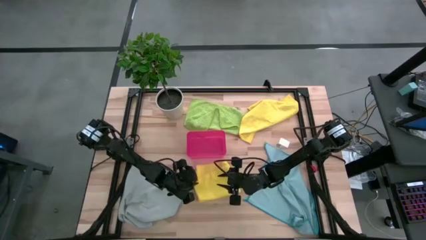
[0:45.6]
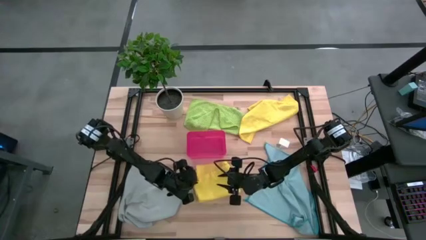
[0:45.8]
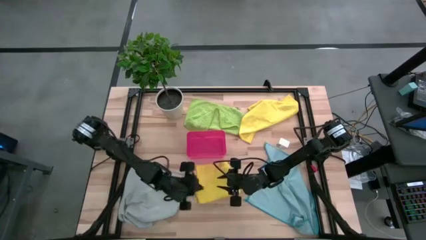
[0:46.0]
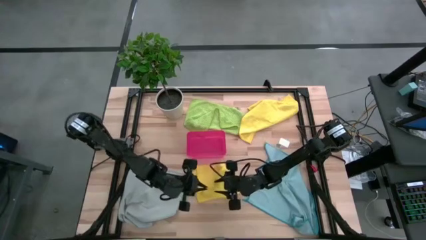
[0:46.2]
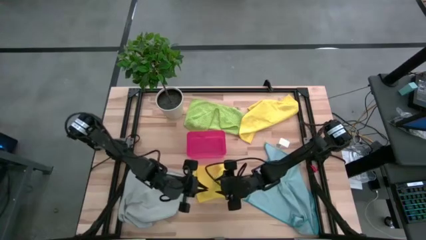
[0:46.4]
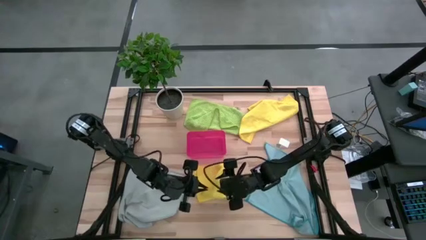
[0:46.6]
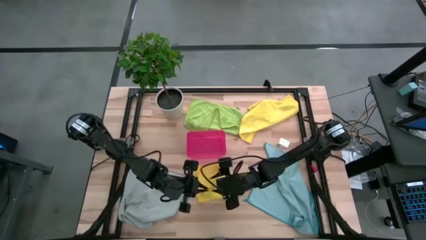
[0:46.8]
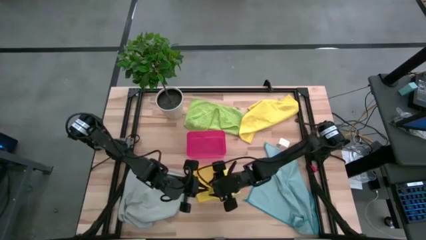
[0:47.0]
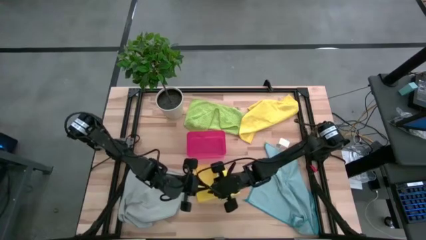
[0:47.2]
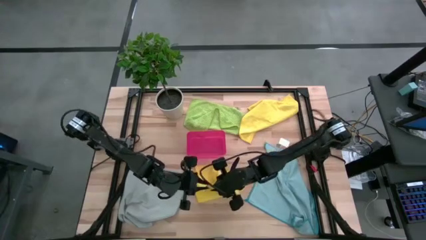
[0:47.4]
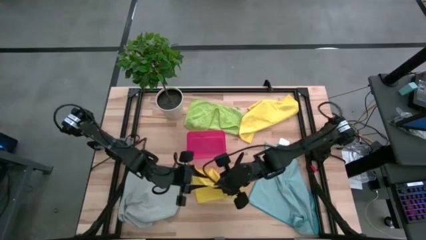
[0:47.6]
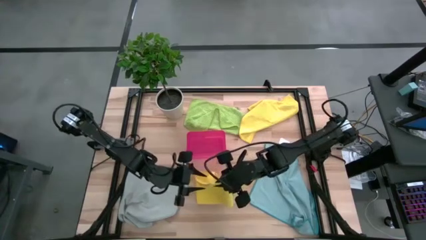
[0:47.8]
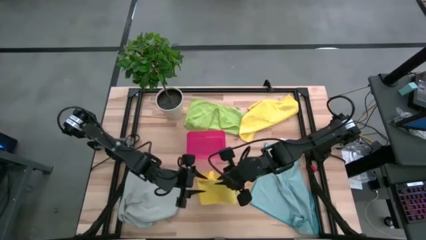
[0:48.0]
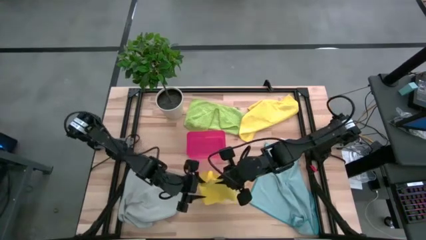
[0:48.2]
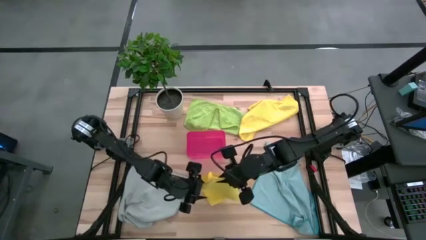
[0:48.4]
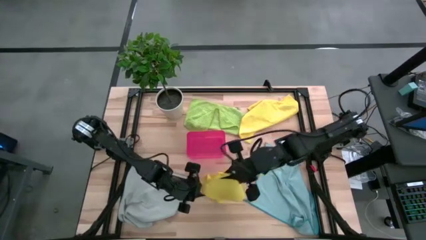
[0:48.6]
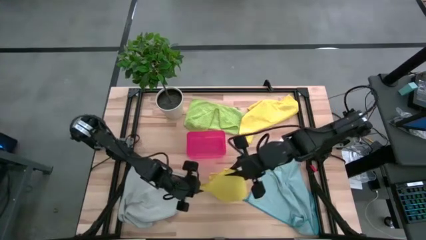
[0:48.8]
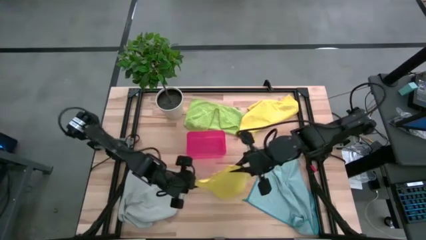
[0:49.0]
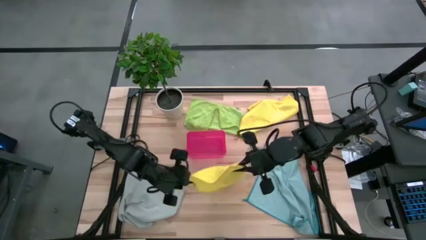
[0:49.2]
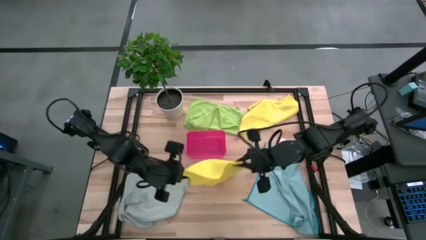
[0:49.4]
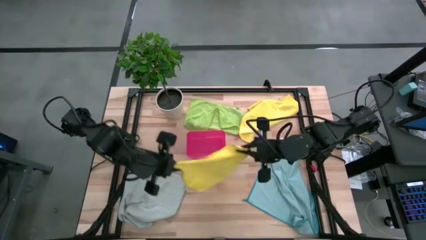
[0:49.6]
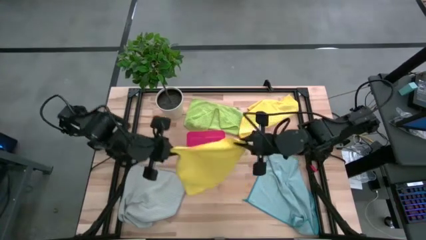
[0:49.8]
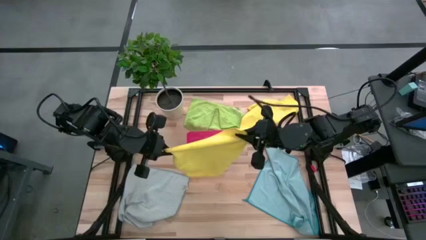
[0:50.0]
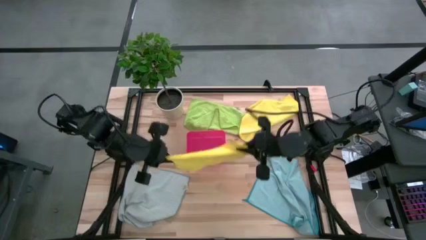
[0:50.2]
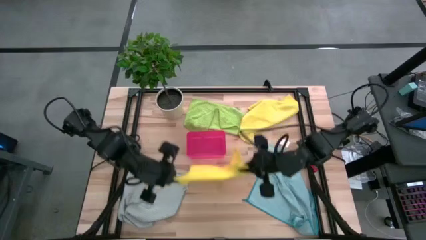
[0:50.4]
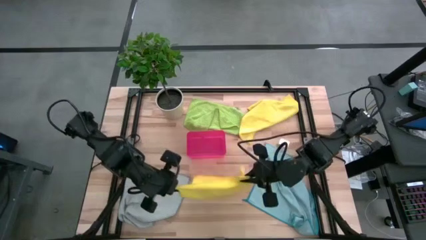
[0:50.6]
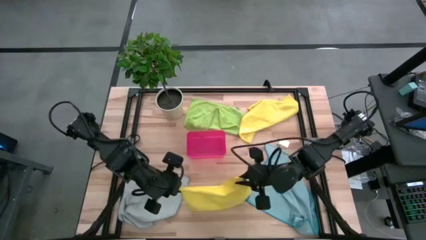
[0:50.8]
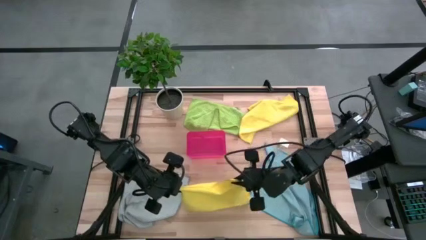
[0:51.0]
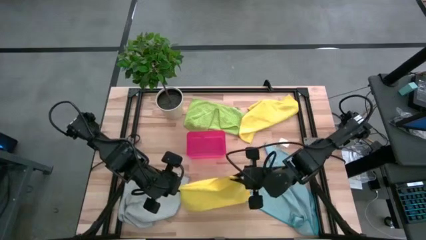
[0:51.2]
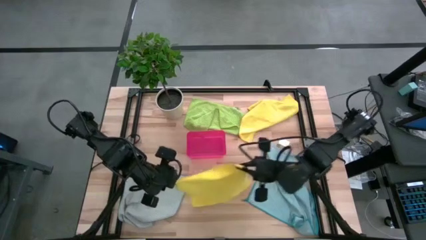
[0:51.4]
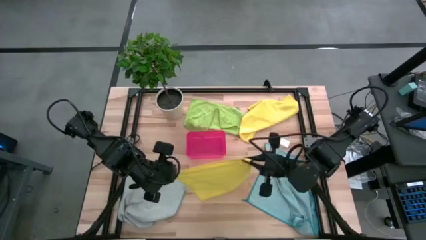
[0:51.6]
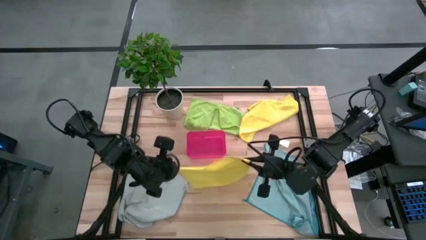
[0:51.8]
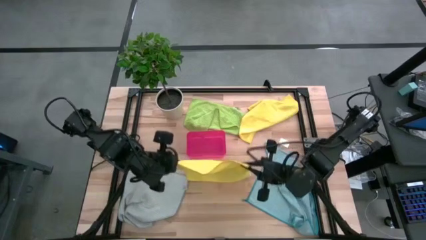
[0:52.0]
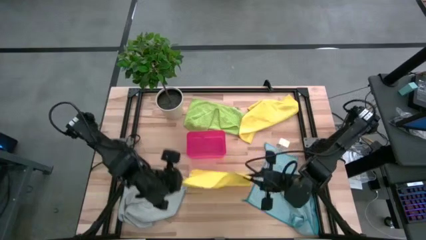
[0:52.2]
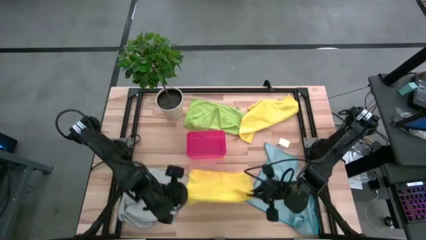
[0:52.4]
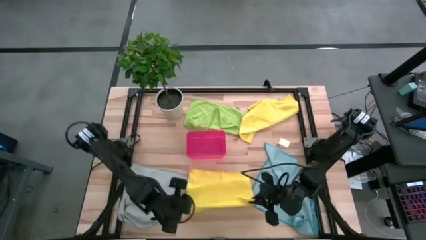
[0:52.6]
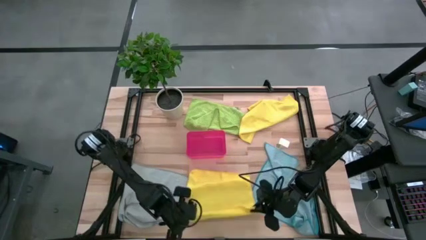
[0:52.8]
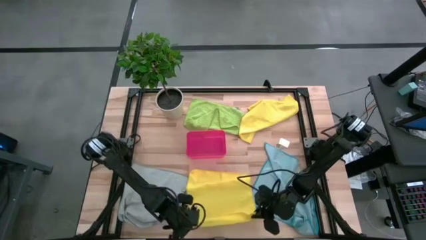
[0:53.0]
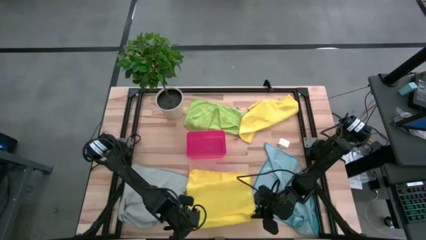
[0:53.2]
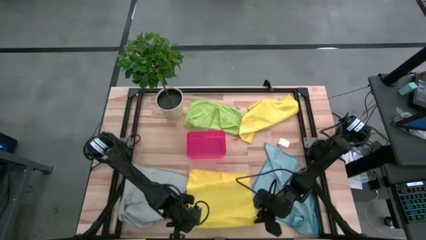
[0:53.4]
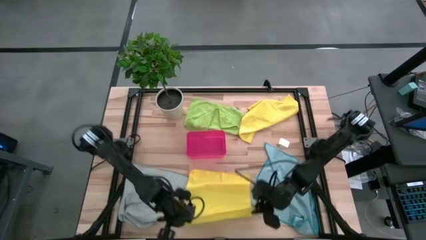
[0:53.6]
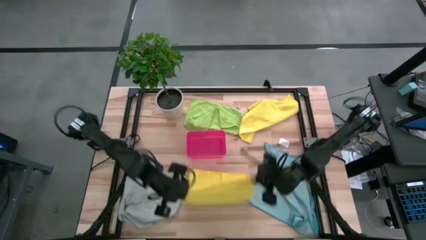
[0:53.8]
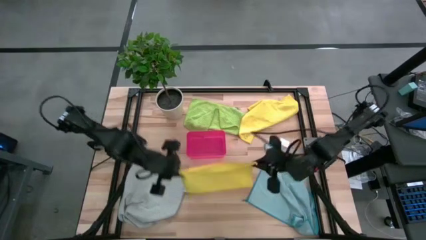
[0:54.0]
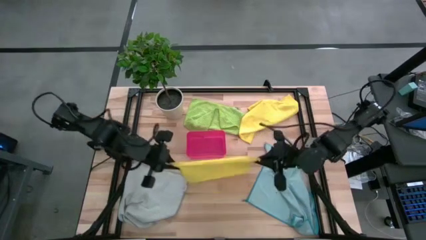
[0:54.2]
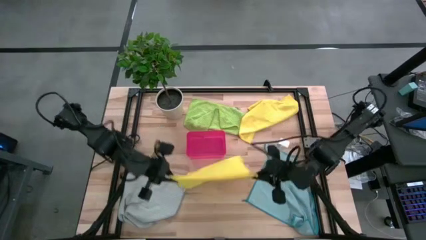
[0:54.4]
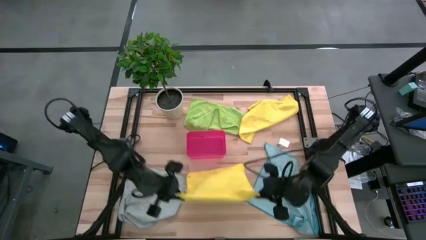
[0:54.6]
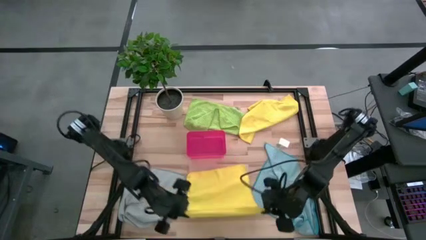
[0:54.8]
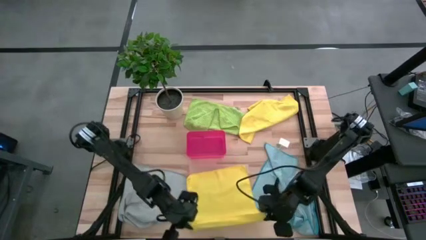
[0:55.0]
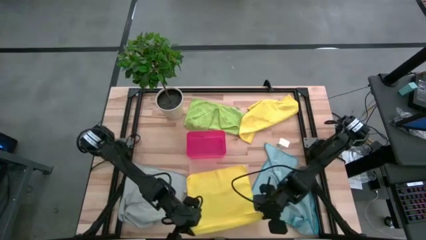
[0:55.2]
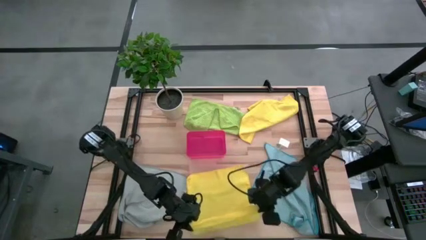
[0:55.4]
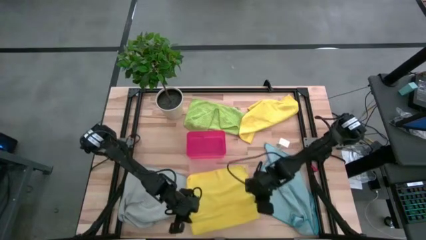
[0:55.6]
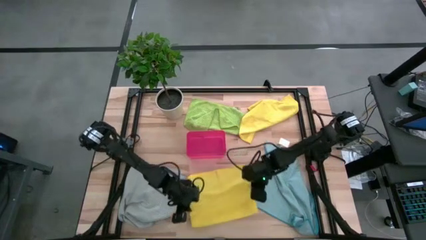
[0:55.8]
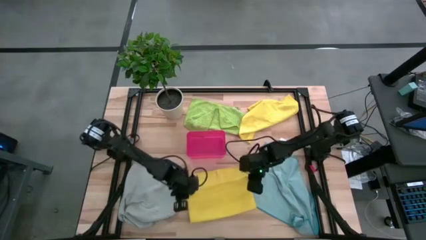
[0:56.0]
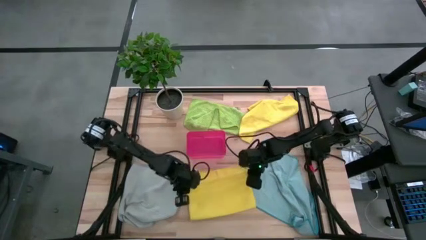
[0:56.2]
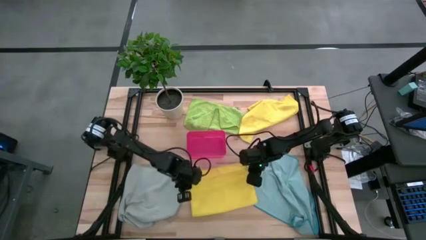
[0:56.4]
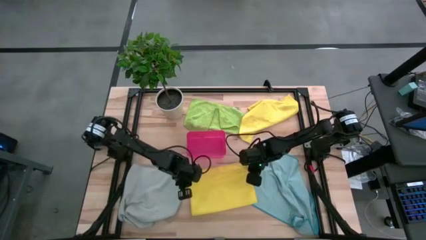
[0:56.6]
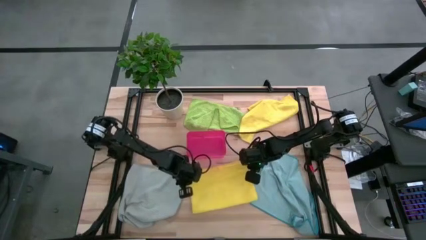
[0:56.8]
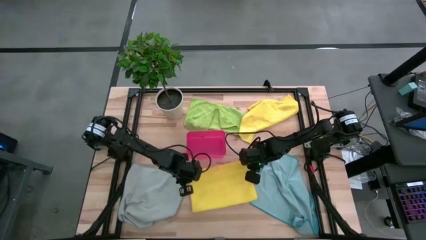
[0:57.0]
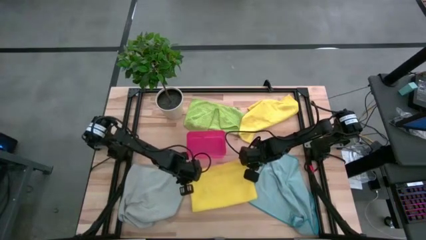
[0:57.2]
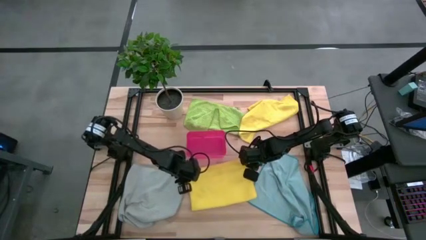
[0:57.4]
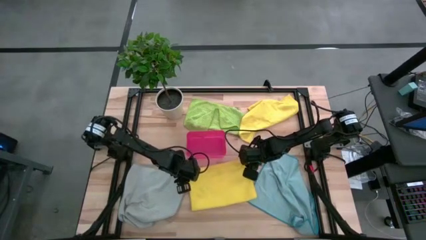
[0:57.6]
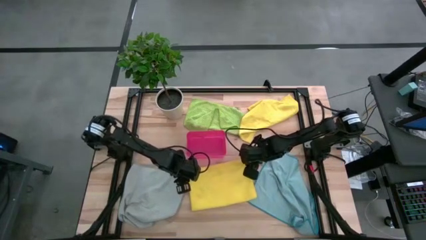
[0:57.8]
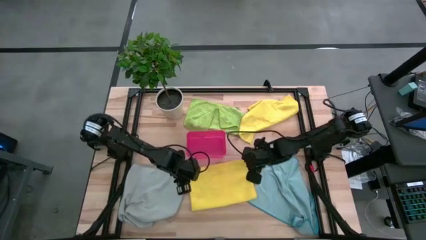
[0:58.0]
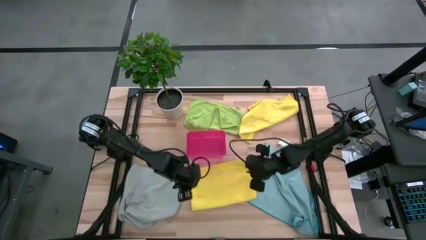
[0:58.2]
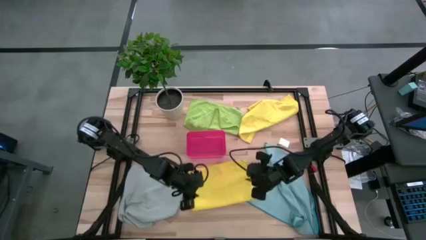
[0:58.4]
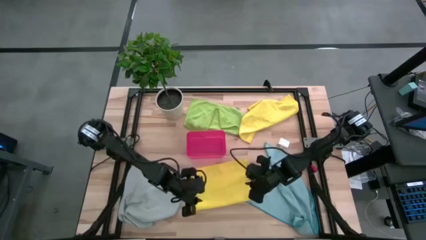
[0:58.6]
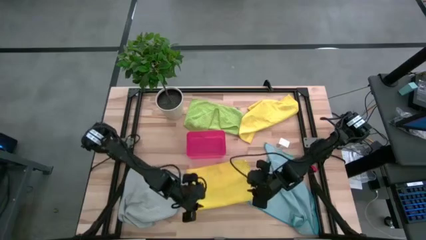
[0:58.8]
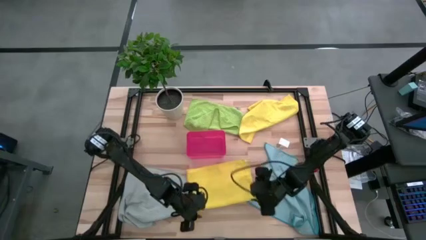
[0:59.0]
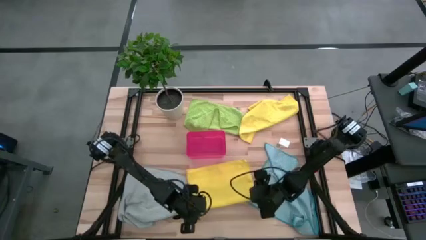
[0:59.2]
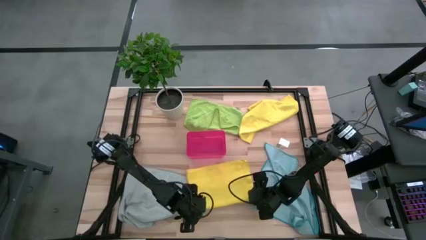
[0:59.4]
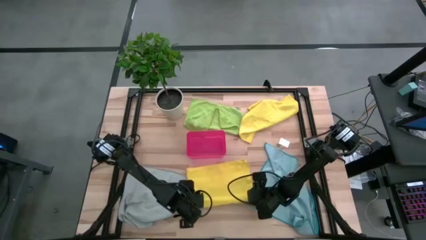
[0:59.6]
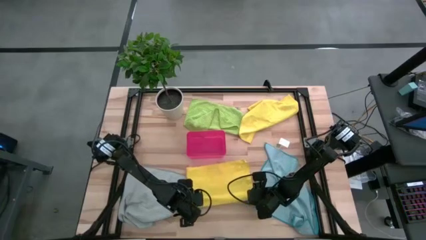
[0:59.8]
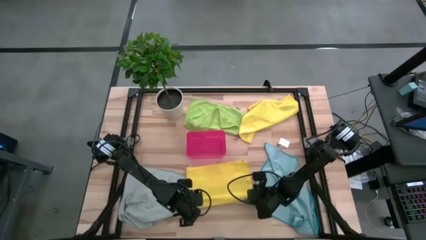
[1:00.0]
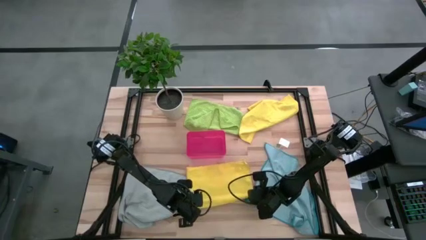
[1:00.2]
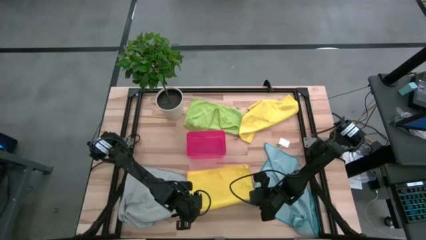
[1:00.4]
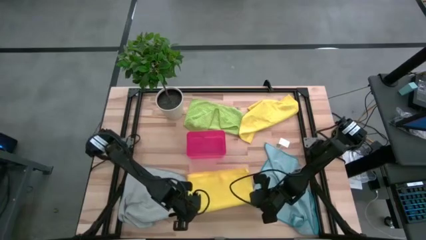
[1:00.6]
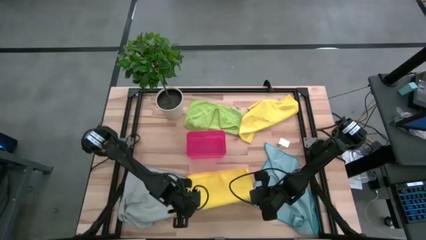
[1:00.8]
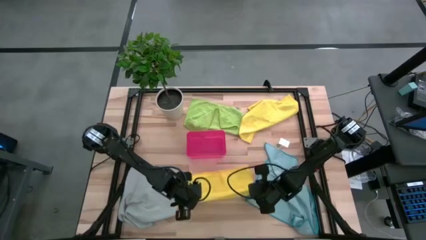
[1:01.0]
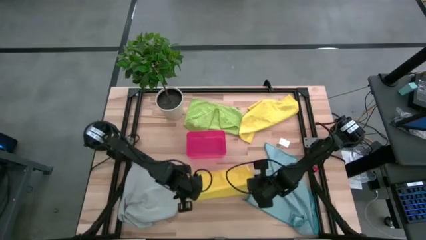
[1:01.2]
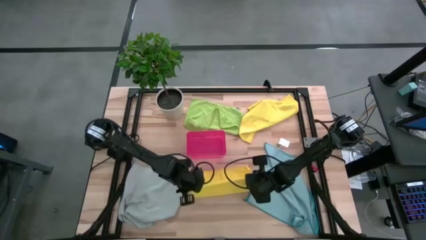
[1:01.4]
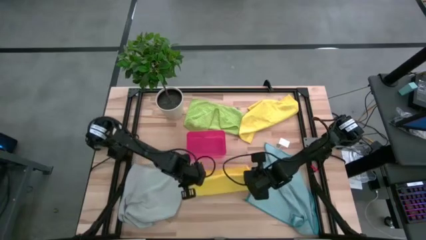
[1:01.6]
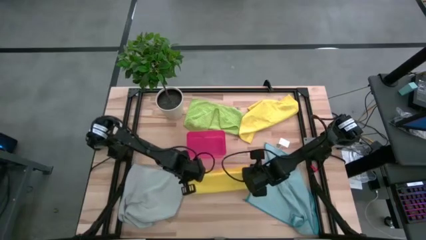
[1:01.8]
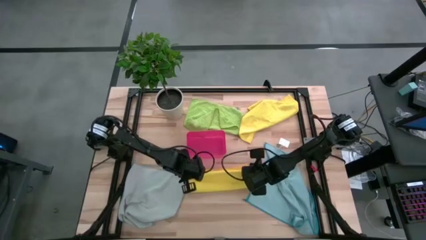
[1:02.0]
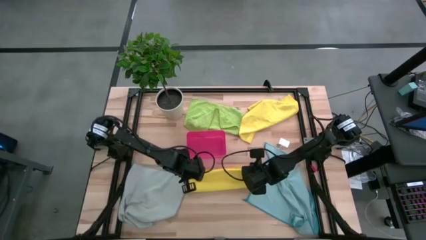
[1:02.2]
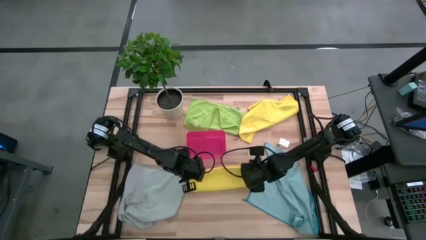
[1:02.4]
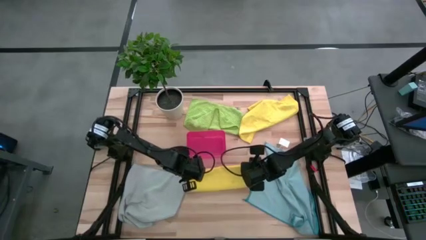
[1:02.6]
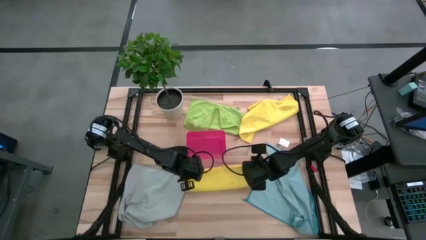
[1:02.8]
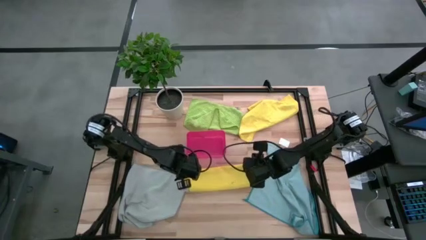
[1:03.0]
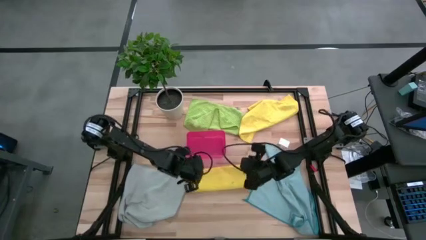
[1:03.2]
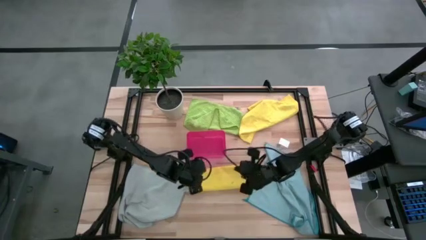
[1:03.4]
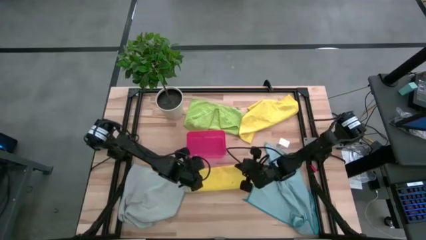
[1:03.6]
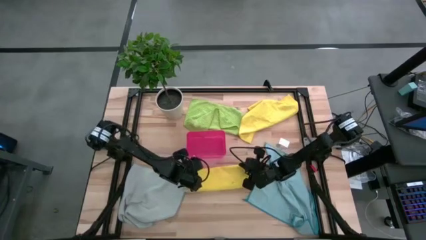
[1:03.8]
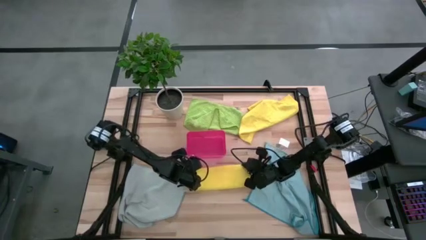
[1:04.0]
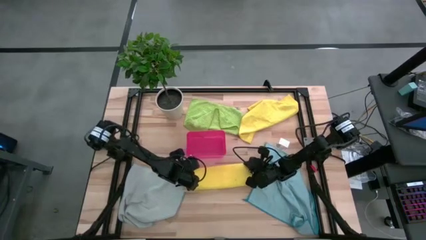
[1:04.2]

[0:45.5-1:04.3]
Task: Fold microfiber towels
Fold the bottom yellow microfiber cloth
